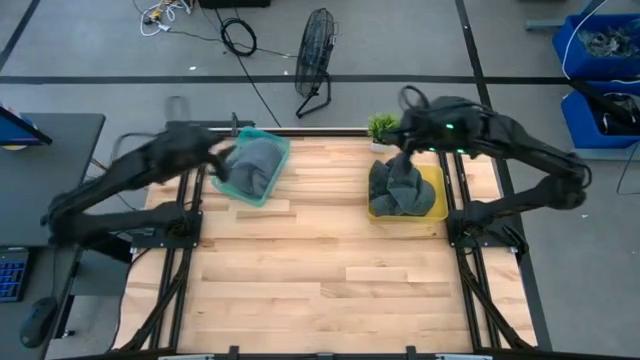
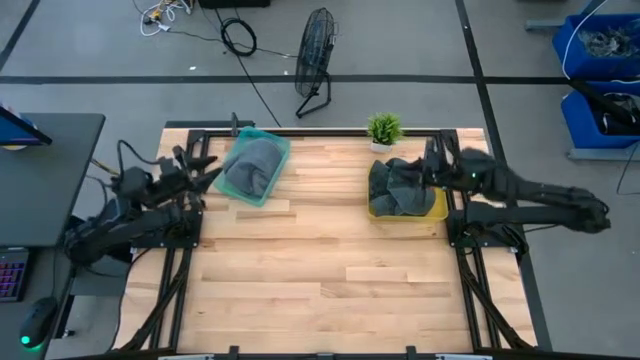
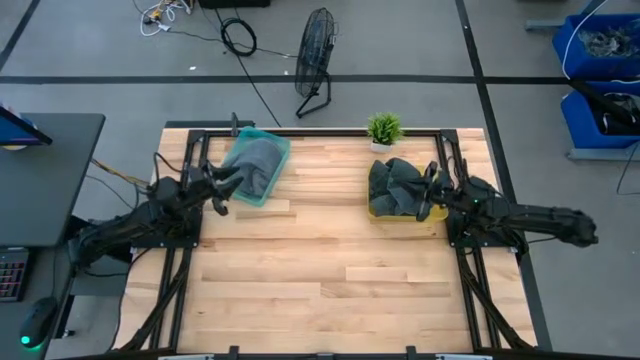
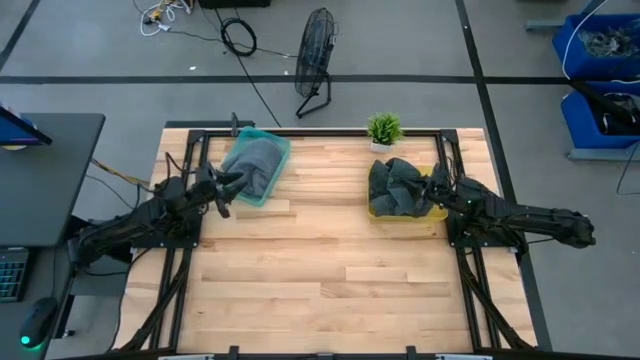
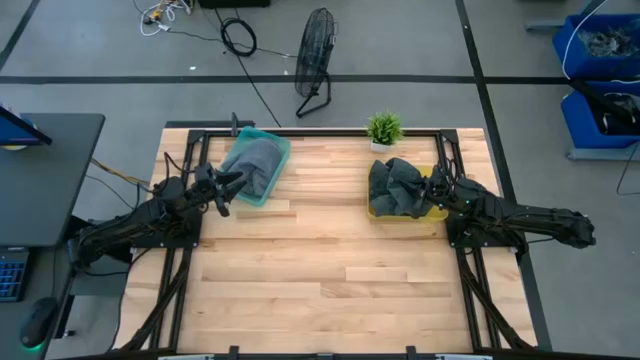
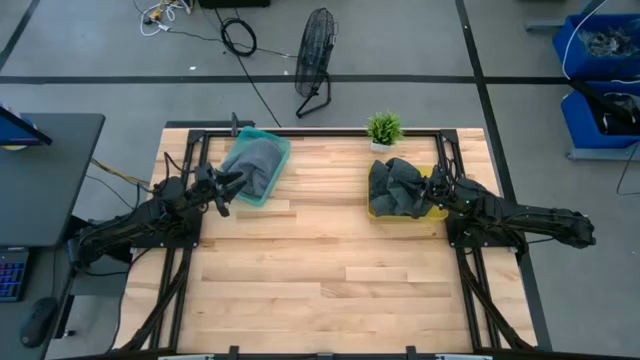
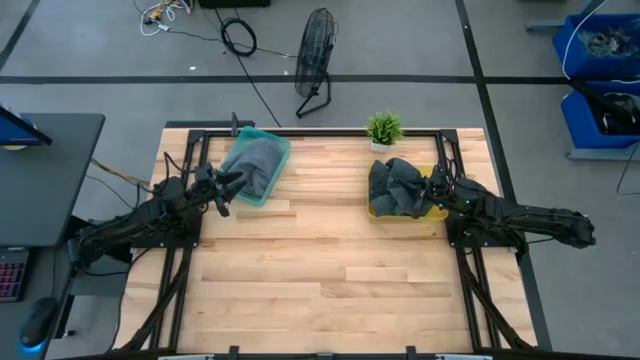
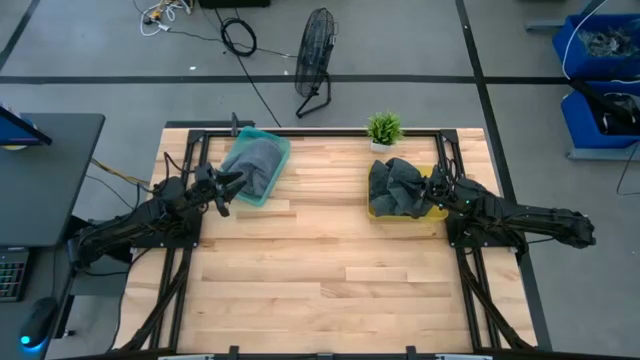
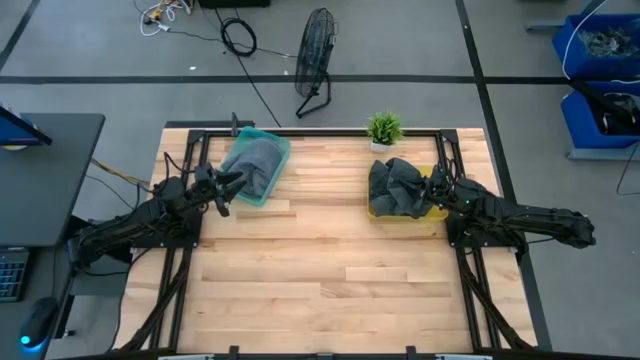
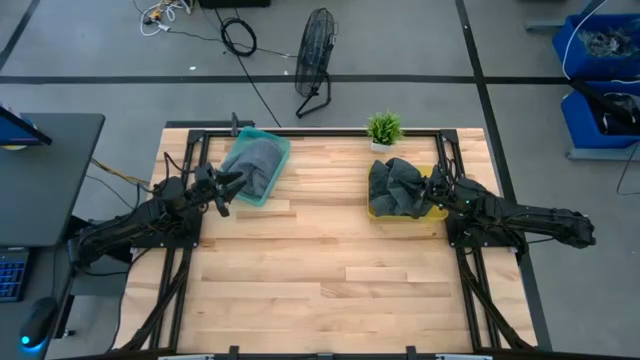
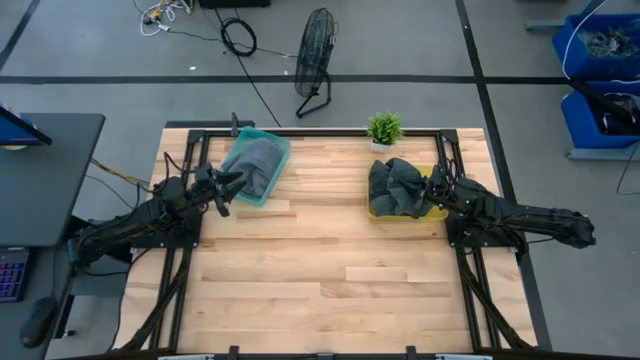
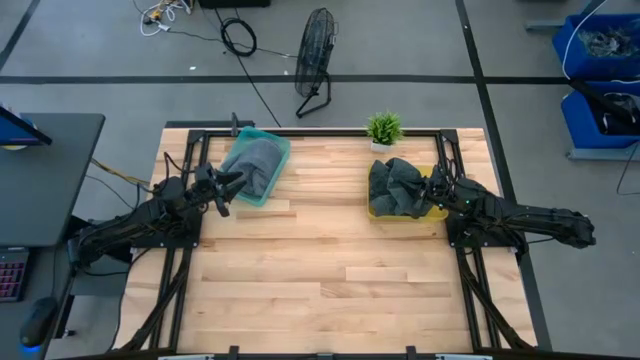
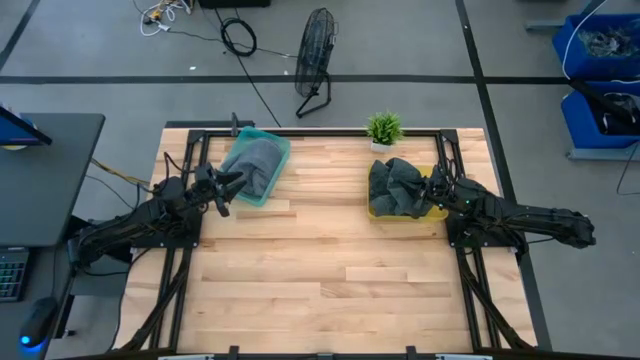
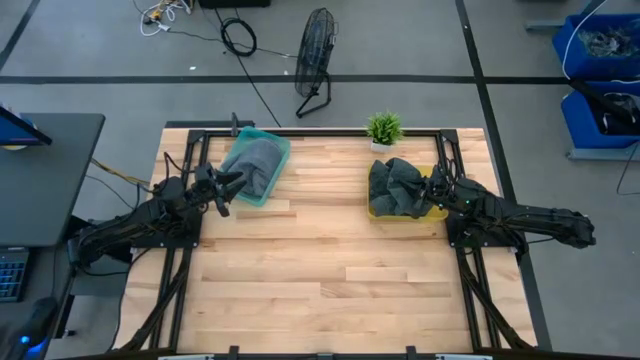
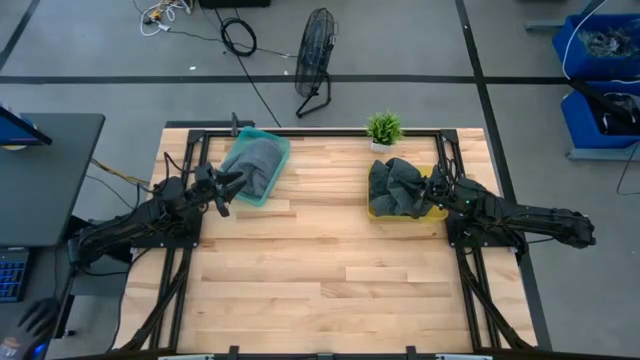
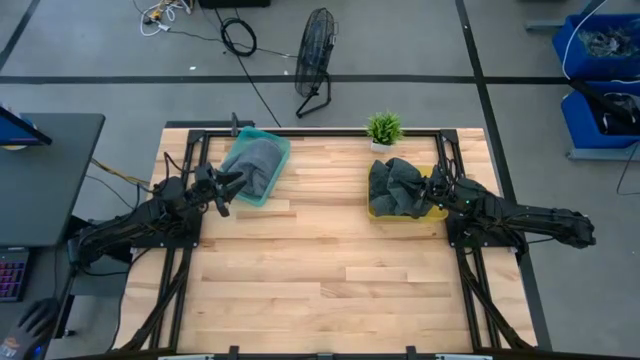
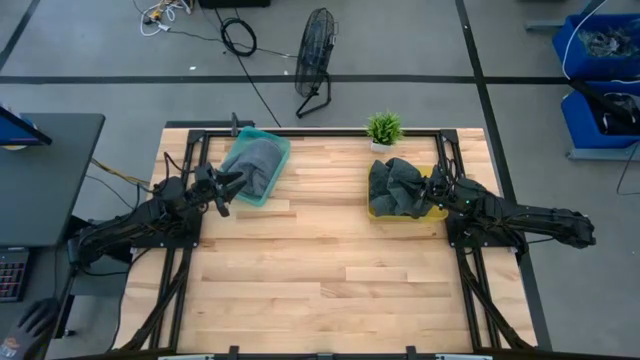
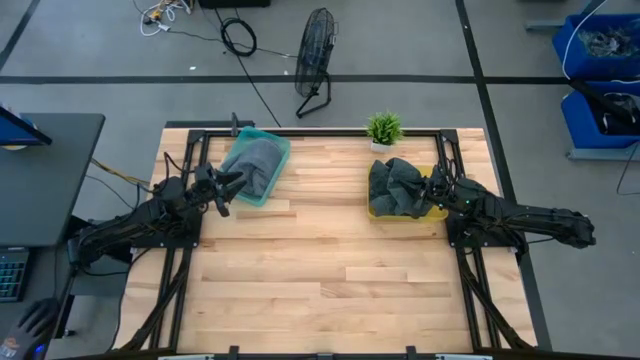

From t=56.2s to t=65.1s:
Task: Pick & Place hat
Return to Home Position

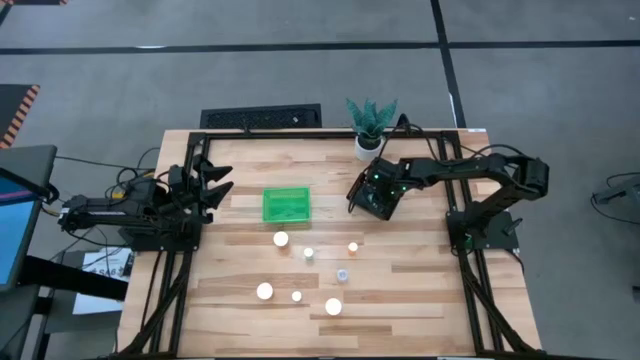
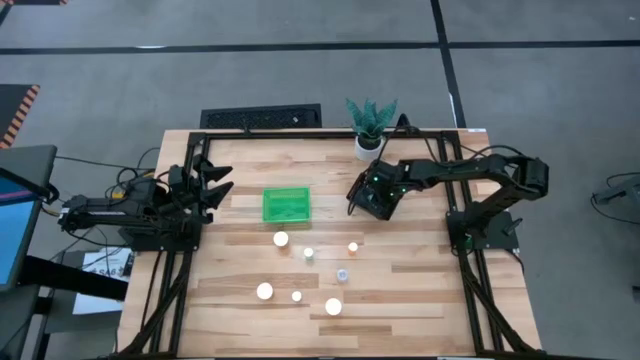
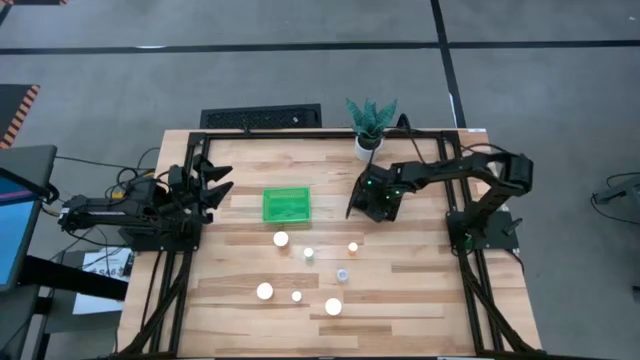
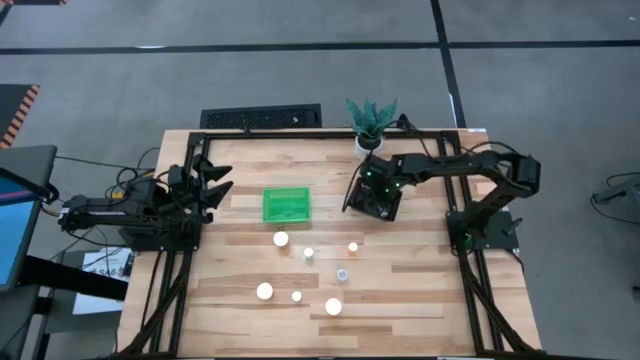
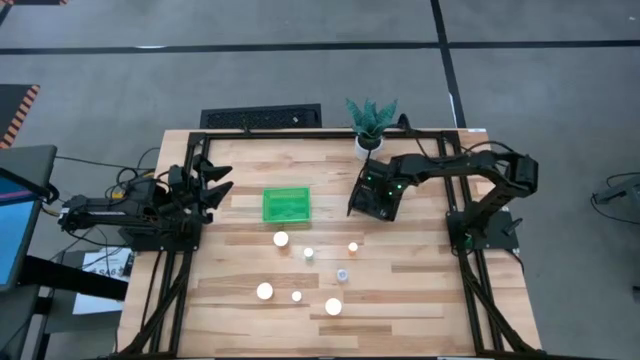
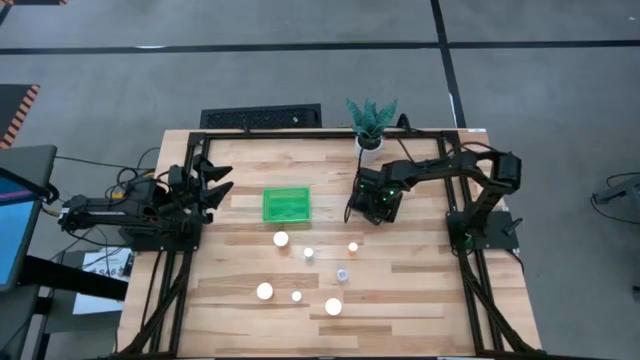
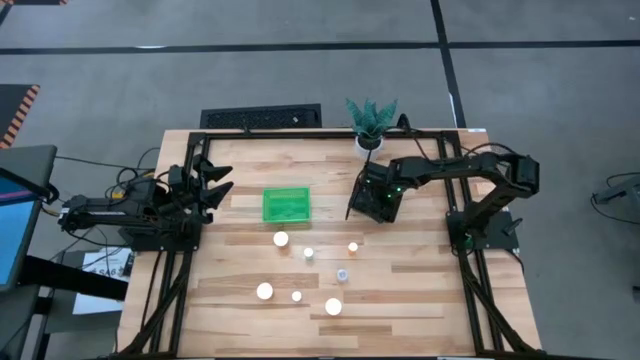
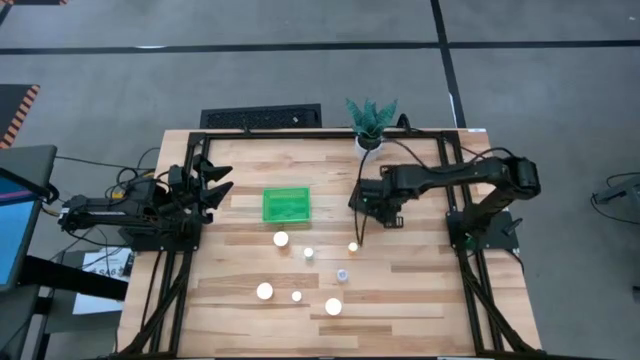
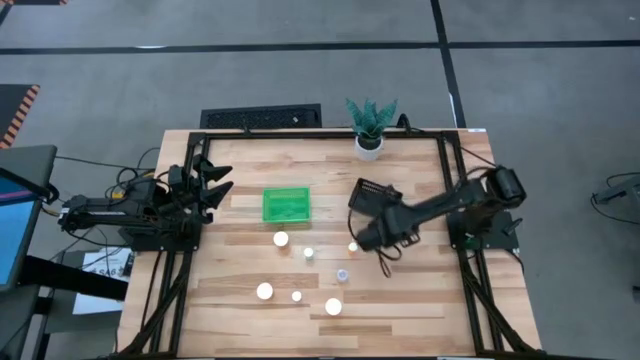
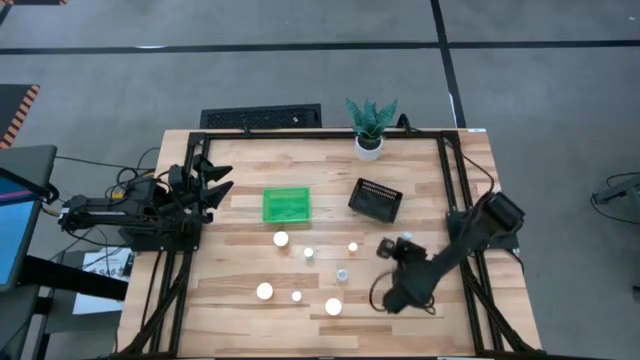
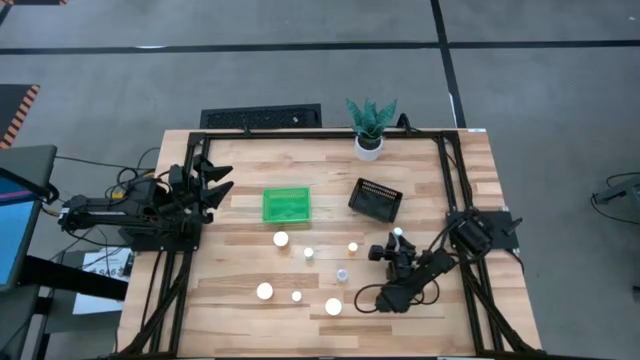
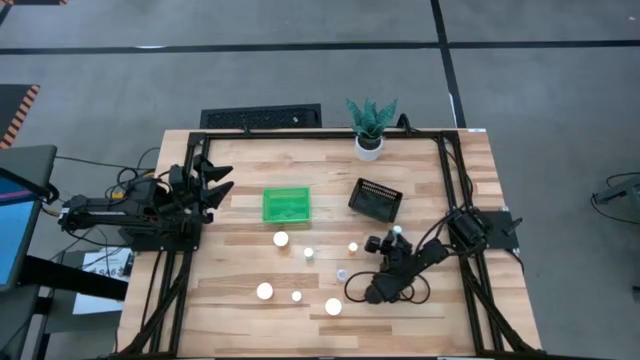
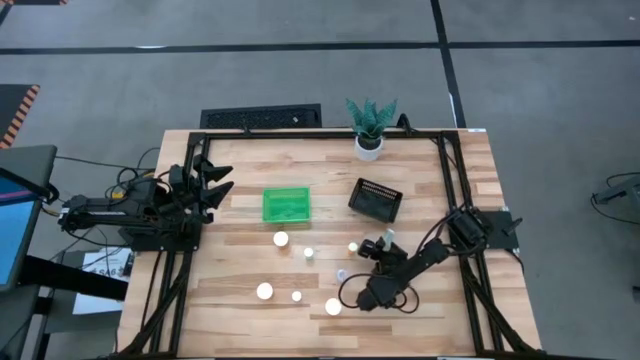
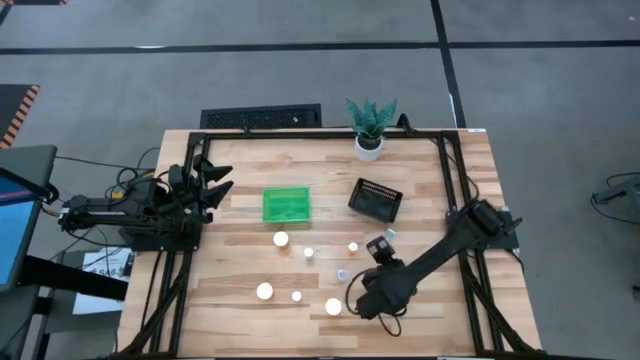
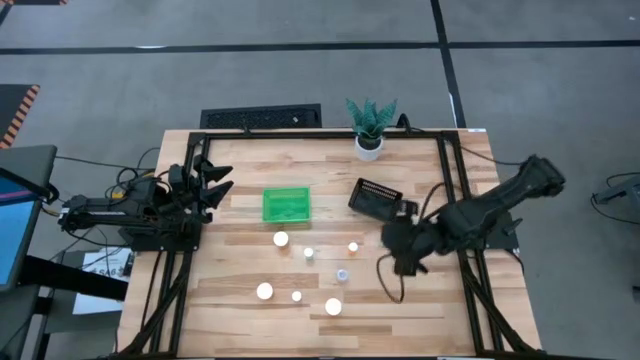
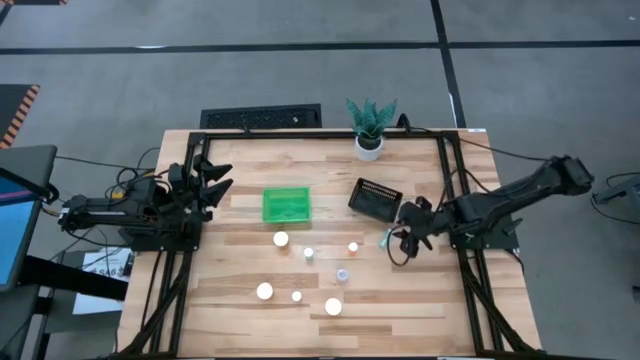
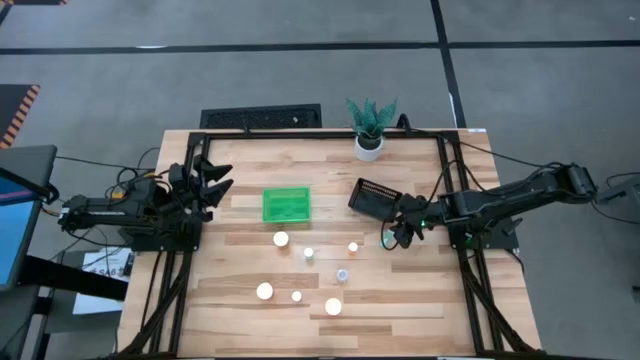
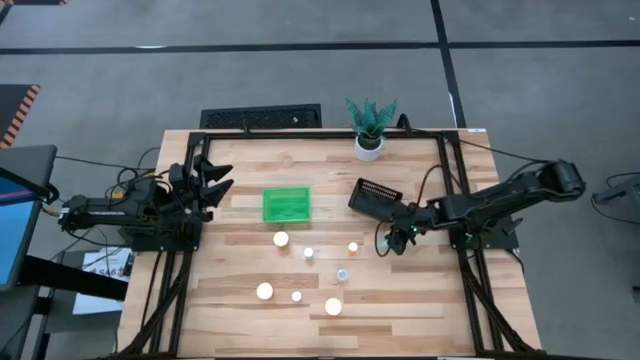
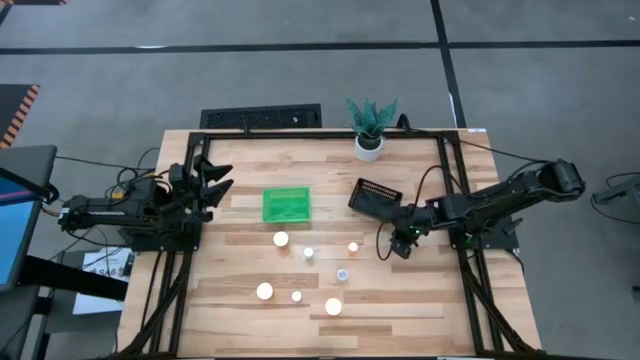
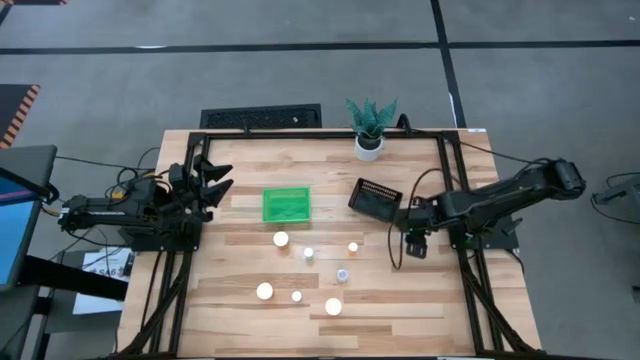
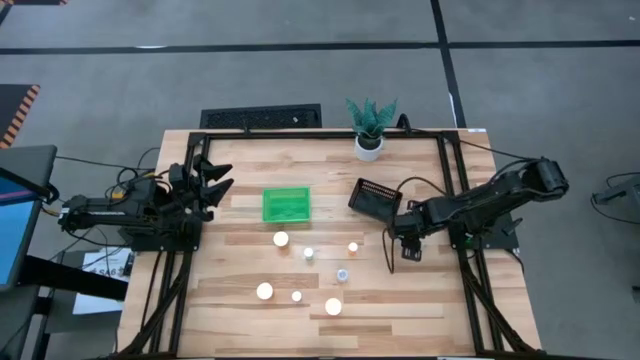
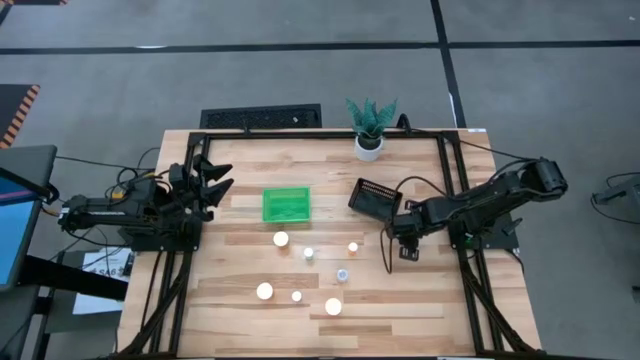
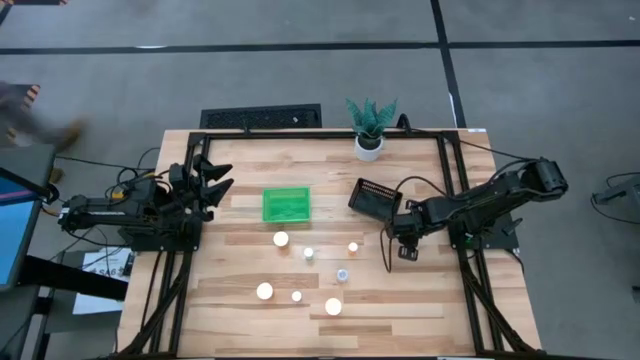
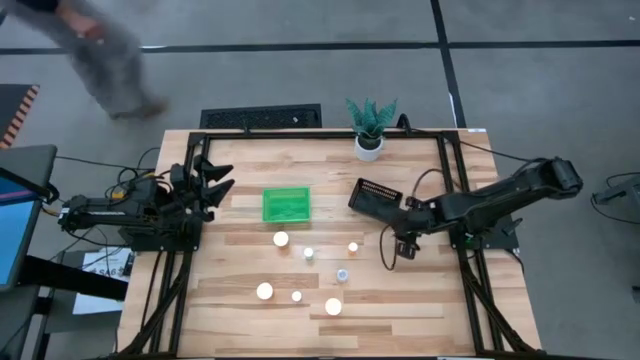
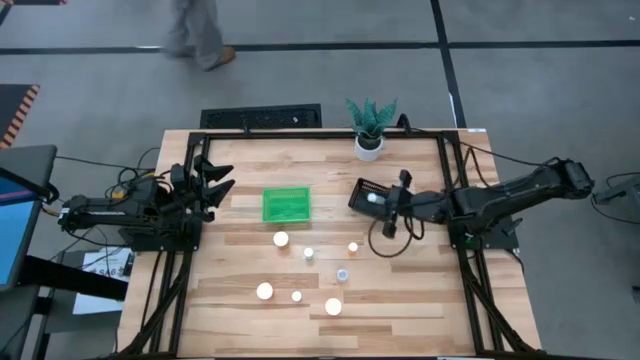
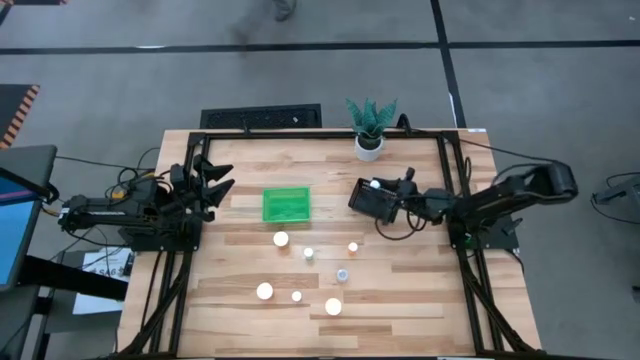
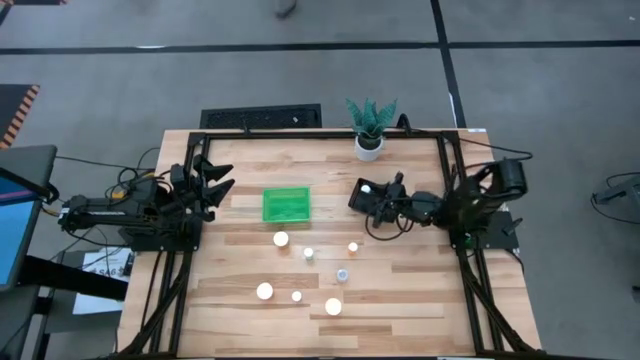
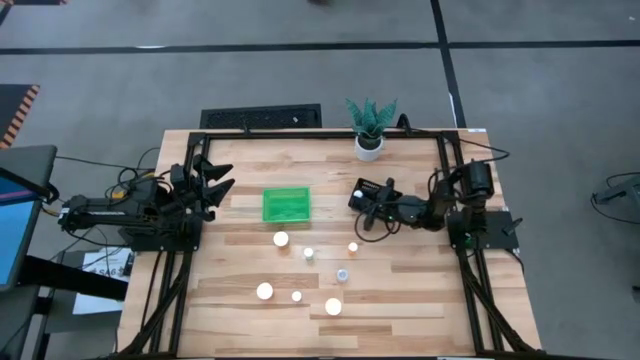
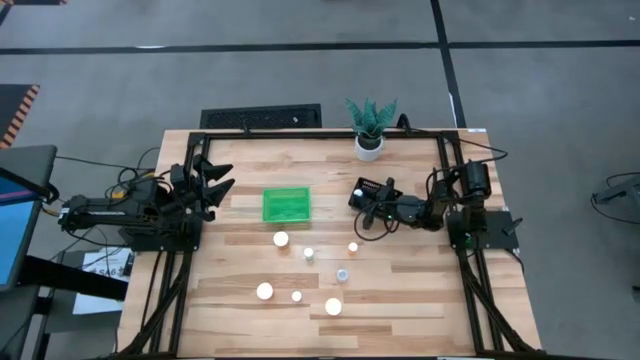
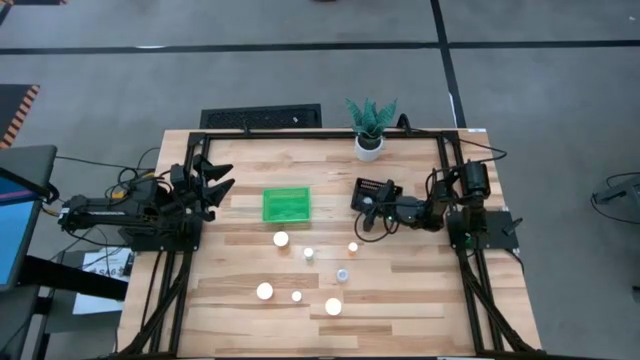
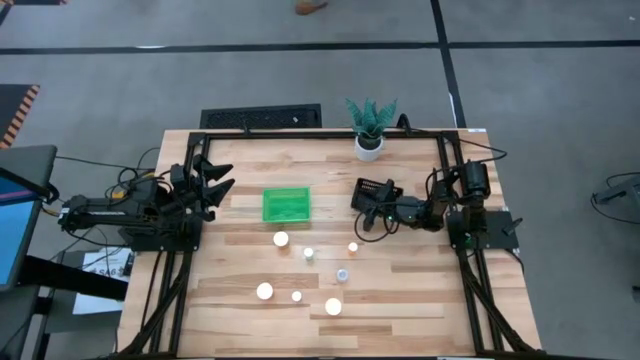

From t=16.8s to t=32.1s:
Task: Pick and place medicine bottles into bin by pill shape (circle, oval)
Put the right blue tablet bottle into the black basket
